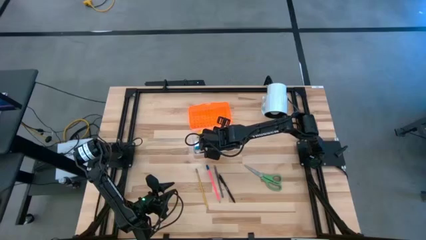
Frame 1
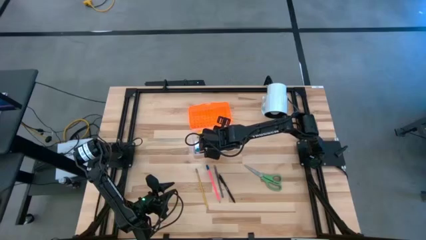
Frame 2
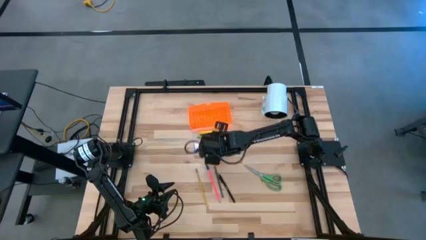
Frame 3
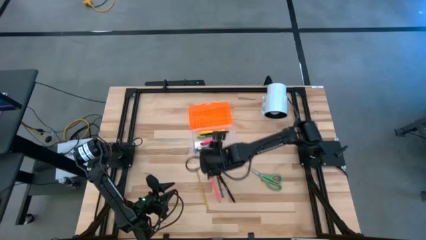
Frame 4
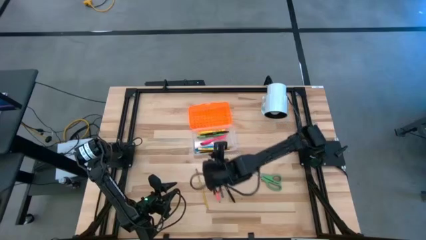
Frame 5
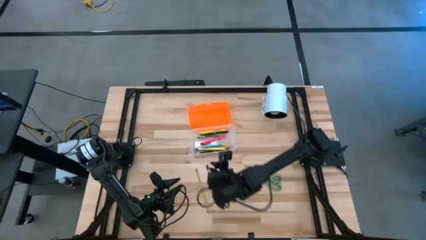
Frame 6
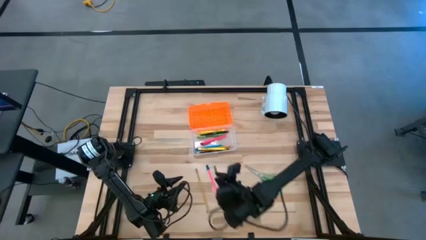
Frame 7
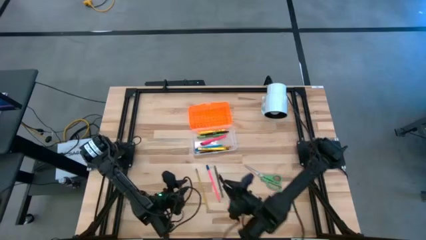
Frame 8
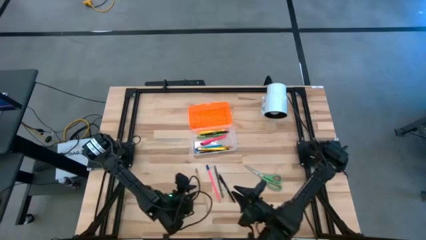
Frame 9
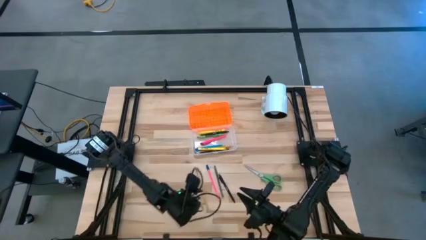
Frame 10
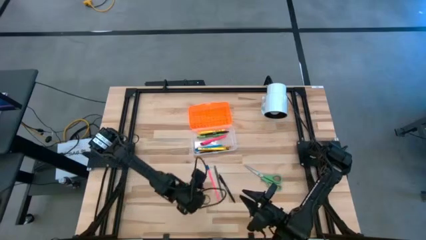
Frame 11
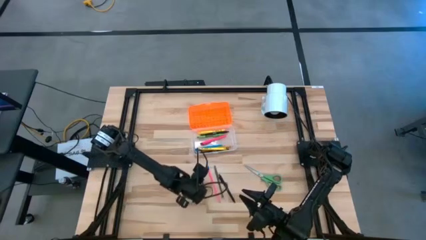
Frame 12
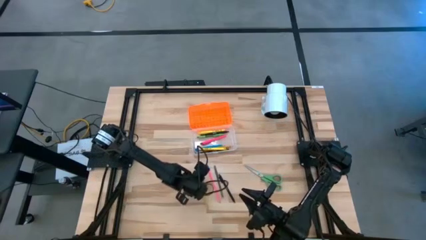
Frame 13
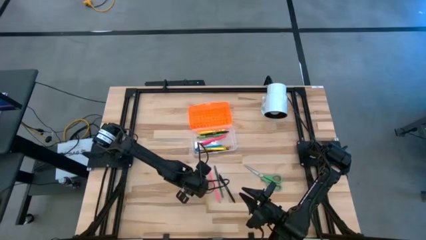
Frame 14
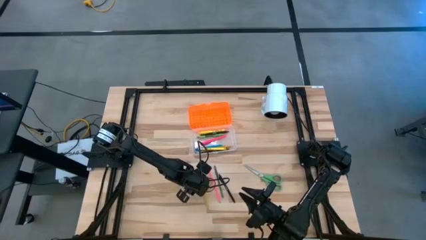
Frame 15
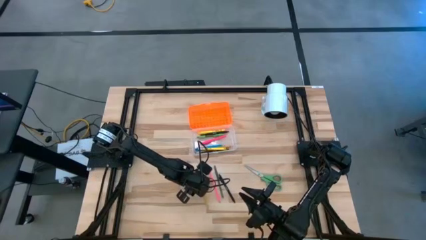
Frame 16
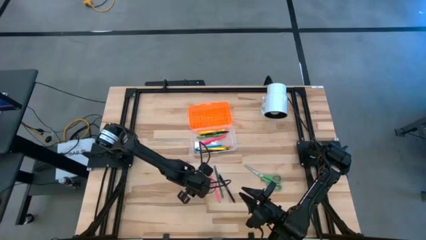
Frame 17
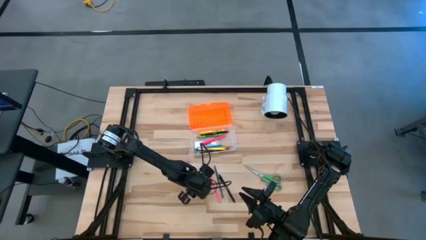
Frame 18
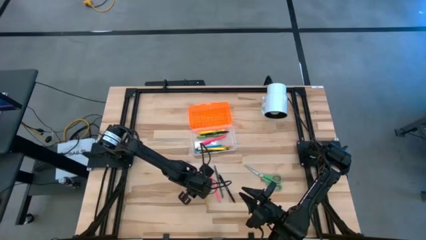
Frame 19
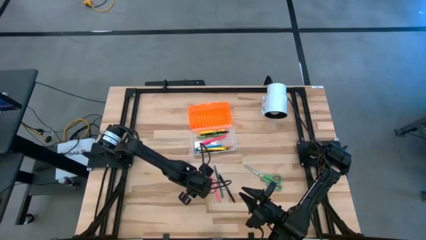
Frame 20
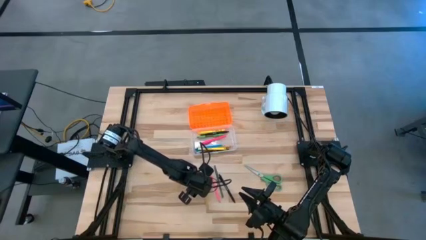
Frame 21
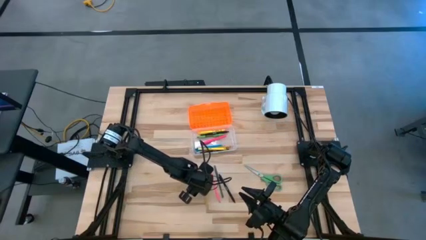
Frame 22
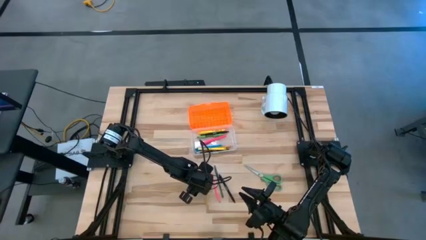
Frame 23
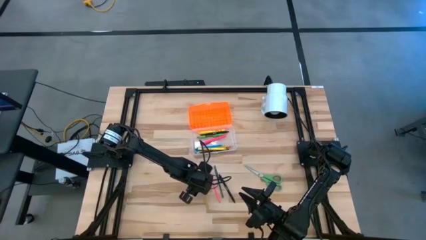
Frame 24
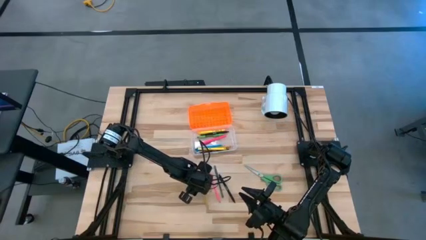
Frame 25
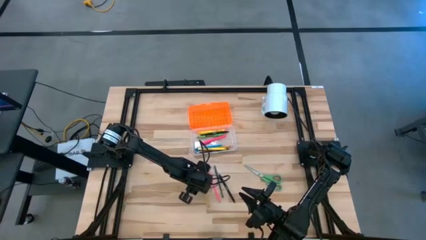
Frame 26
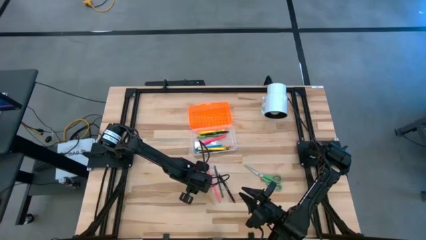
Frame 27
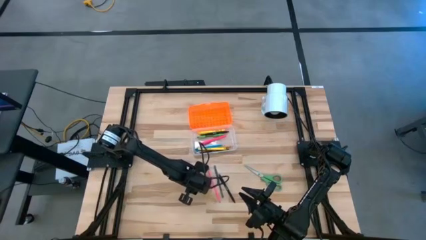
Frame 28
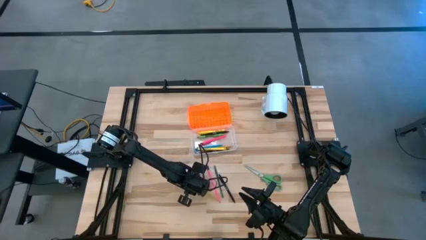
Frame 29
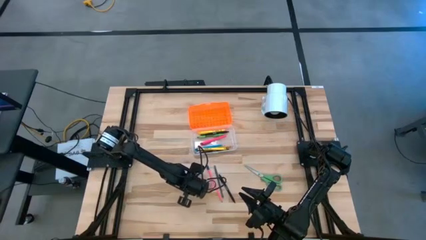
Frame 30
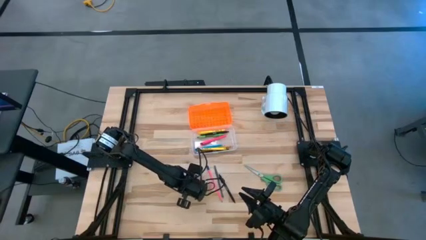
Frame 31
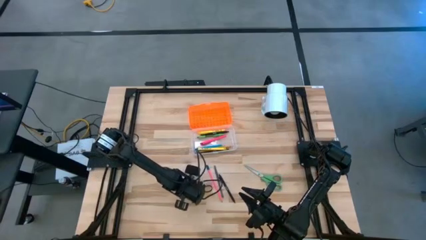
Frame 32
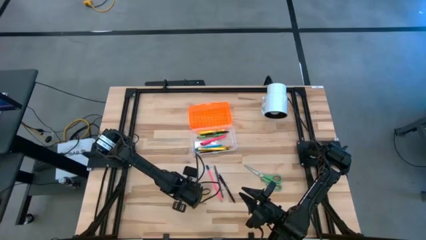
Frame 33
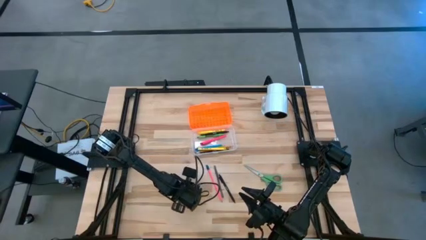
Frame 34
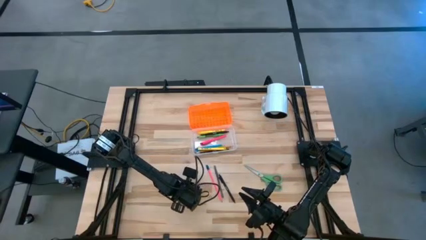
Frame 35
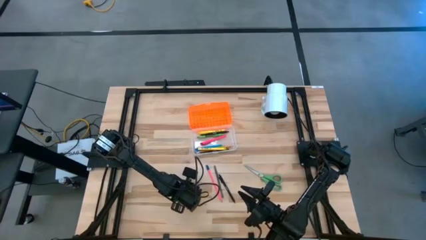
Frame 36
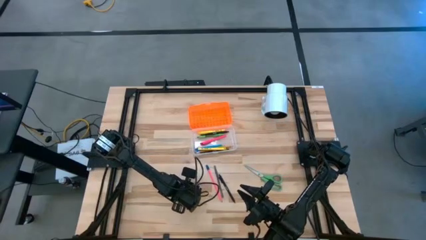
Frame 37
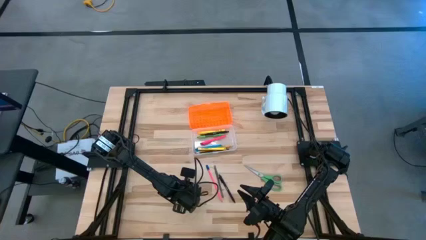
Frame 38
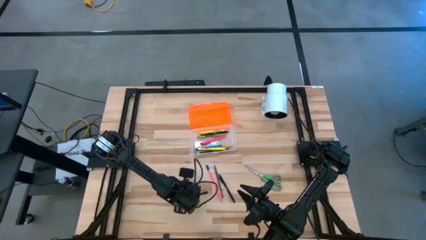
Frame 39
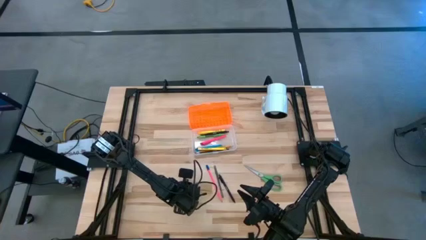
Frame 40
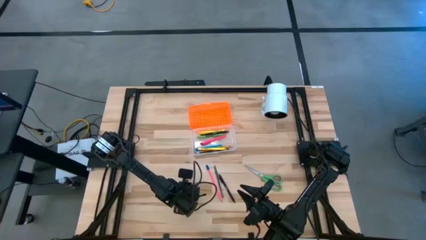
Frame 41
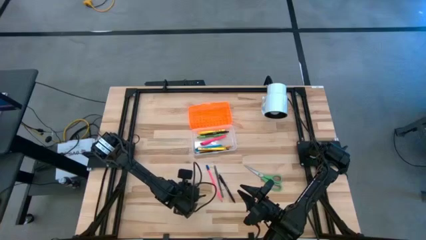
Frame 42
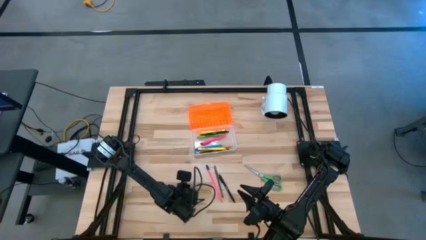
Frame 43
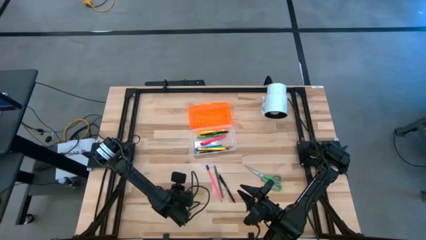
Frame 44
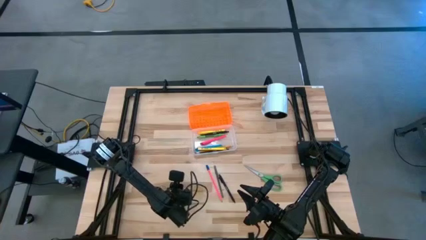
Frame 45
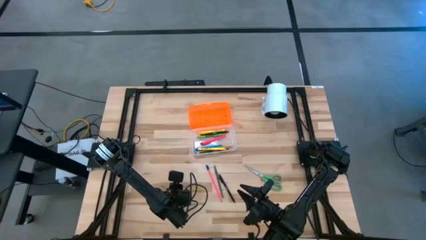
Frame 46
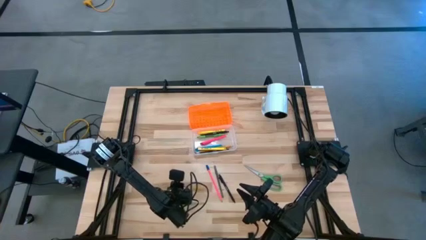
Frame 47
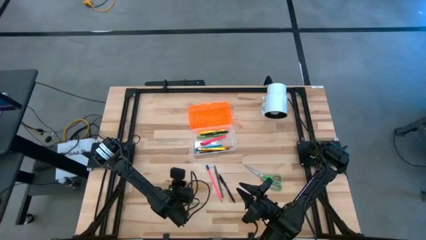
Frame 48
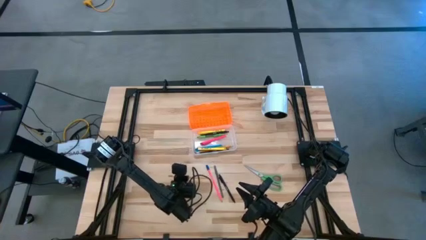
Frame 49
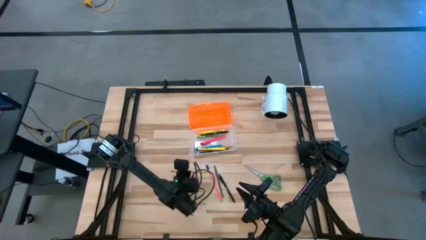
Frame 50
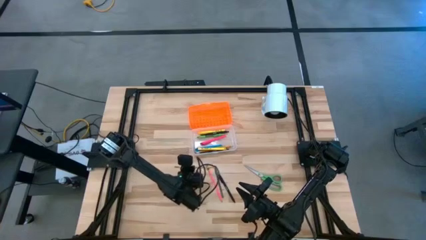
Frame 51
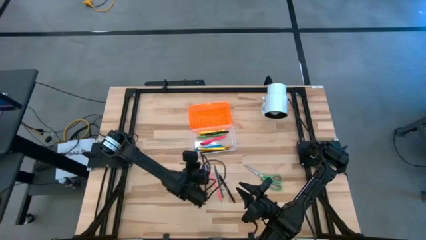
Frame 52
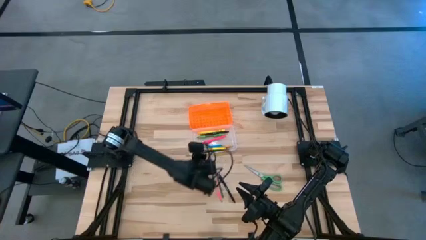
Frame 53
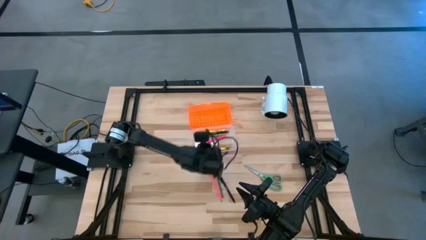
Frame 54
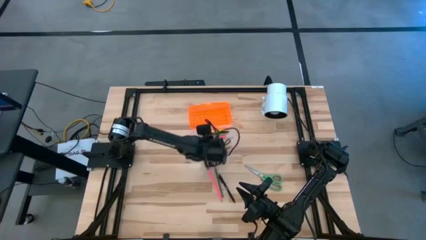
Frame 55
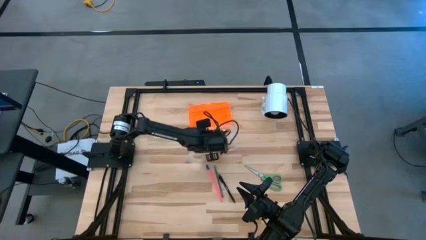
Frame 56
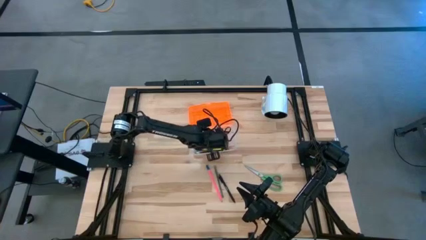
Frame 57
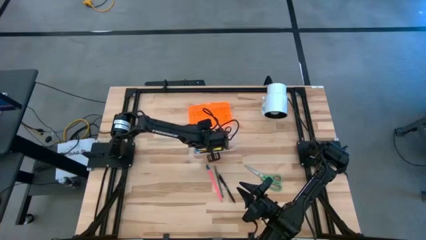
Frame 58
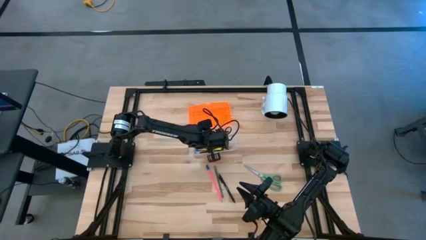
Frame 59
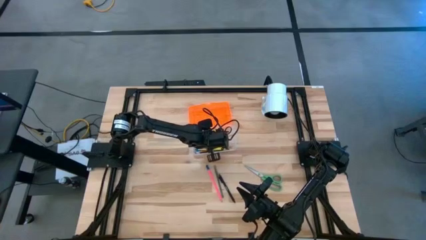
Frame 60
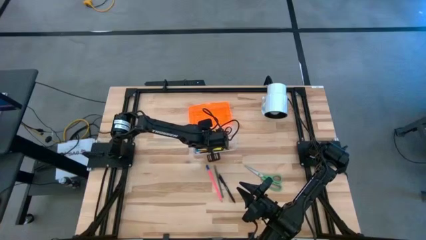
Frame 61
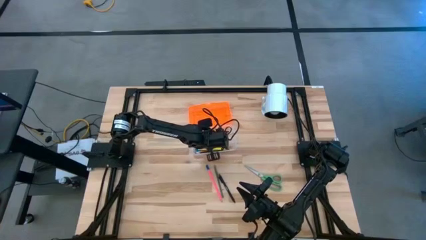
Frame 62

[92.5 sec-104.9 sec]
Task: Pick & place school supplies into a supply box
Put the yellow pencil into the supply box

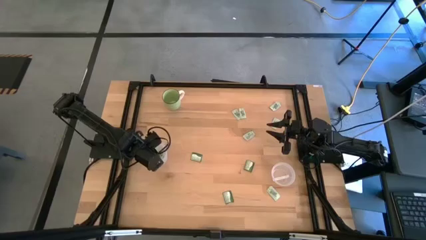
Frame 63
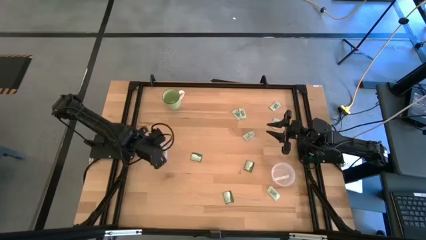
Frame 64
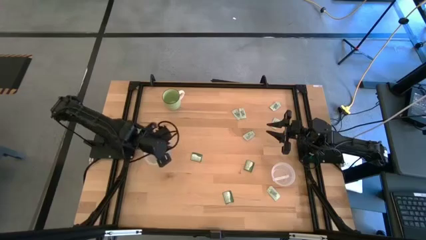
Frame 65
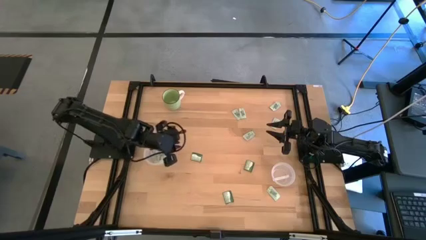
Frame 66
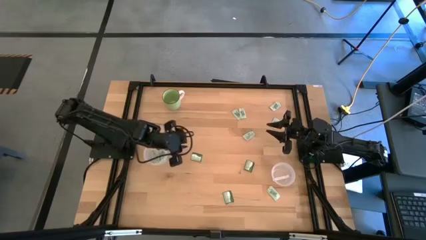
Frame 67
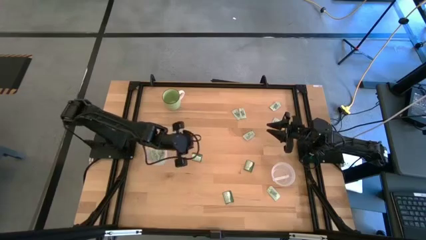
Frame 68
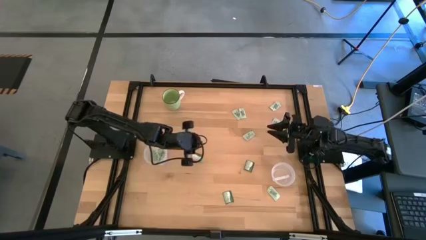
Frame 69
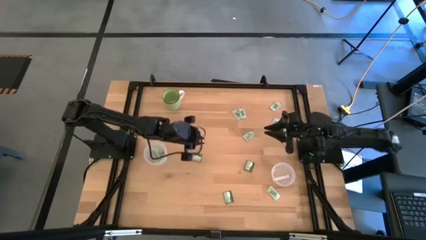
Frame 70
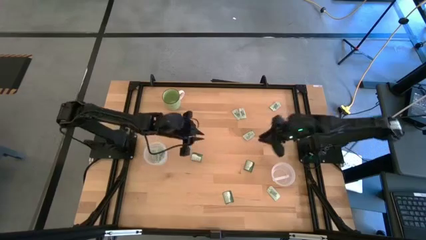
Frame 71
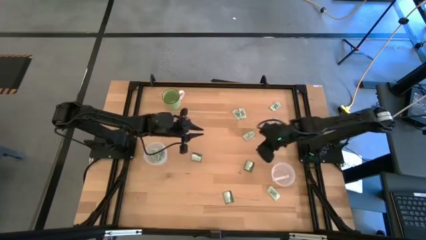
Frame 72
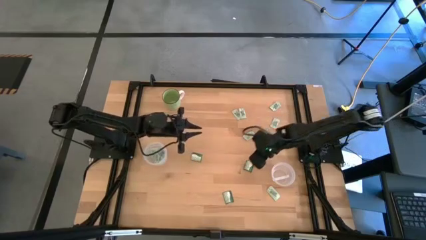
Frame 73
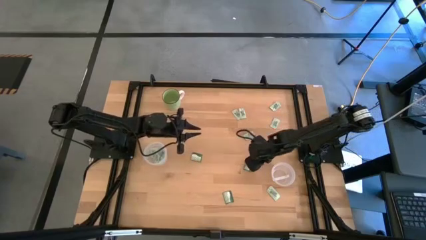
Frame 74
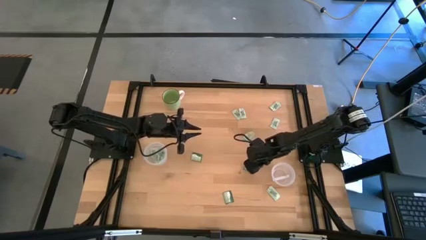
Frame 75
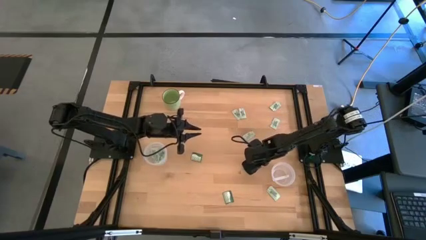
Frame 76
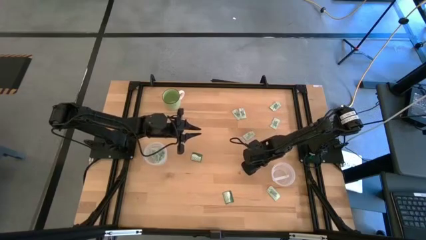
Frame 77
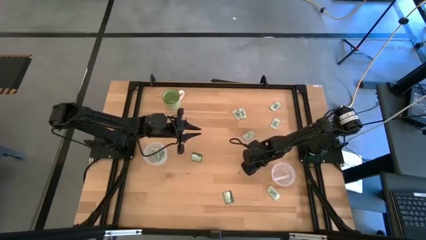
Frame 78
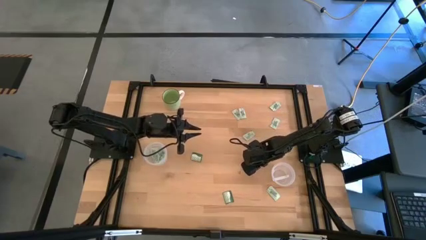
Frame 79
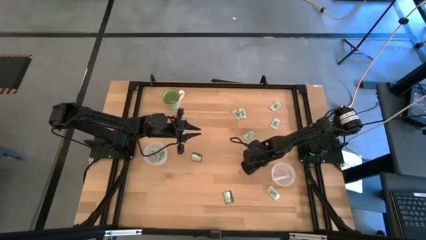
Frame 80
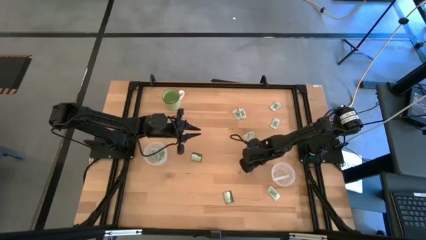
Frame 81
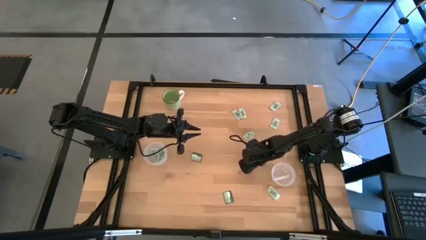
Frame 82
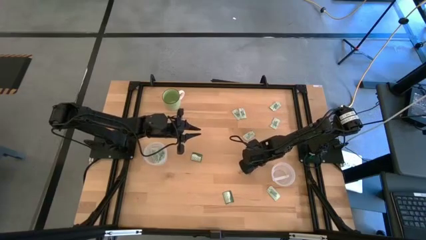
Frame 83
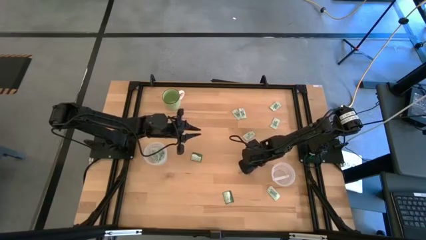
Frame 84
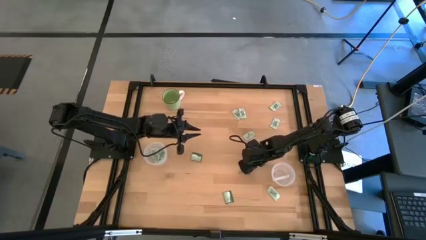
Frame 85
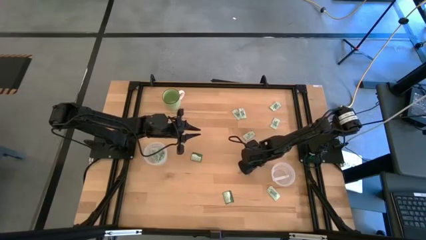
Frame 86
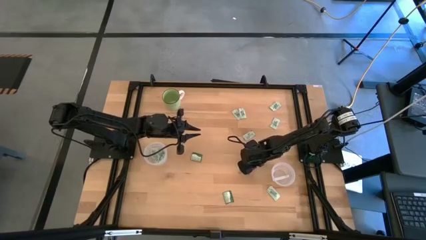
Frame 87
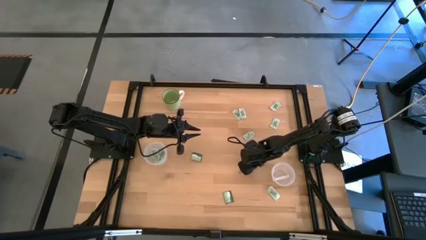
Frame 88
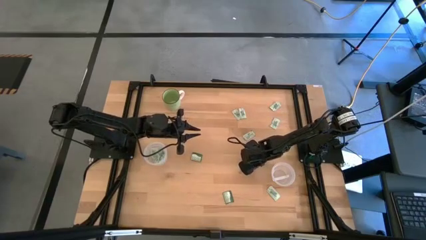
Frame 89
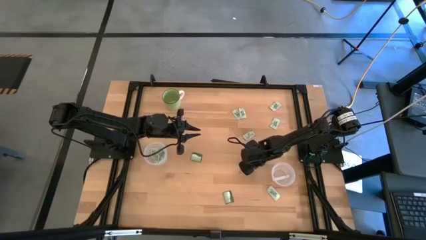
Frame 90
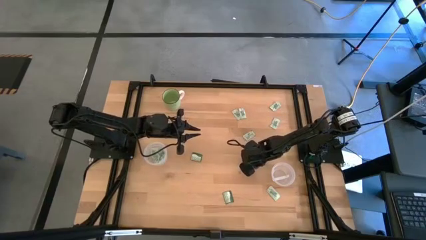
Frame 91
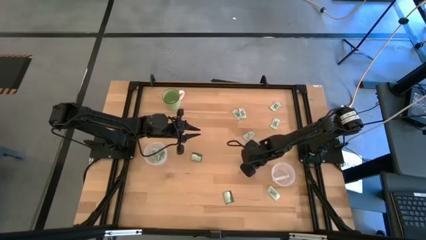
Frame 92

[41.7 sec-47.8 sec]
Task: Pick and place items into bin
Put the truvia packet into the right transparent bin
